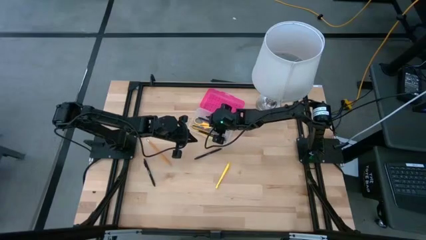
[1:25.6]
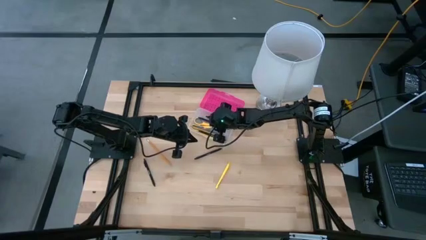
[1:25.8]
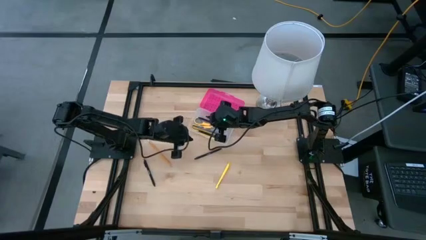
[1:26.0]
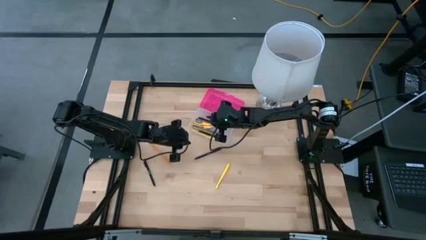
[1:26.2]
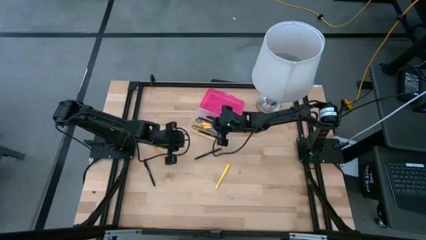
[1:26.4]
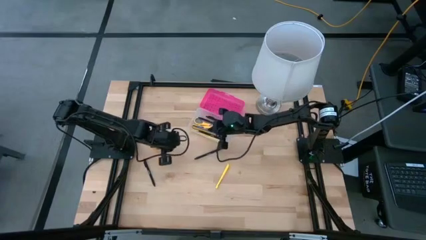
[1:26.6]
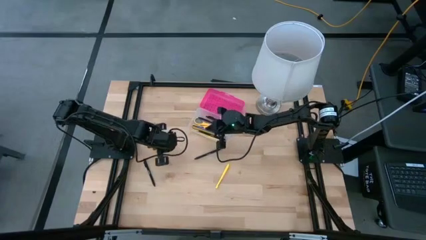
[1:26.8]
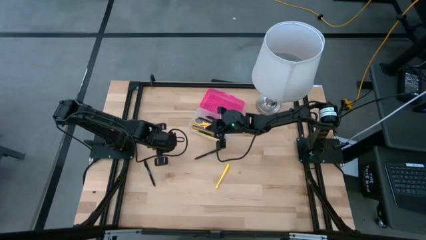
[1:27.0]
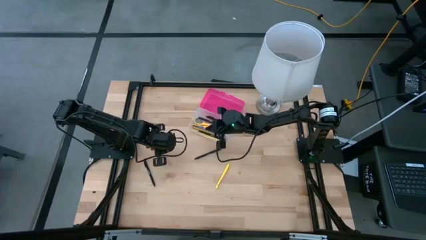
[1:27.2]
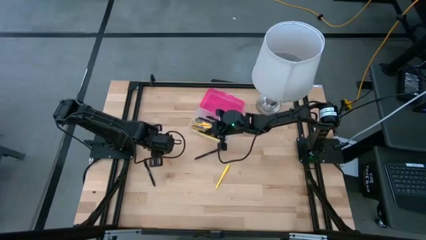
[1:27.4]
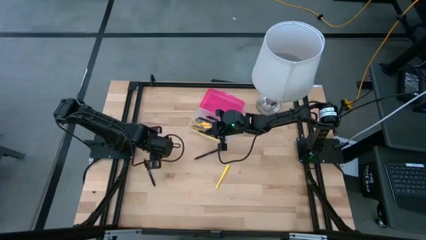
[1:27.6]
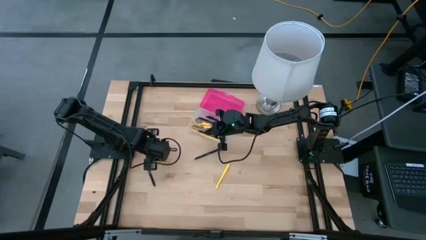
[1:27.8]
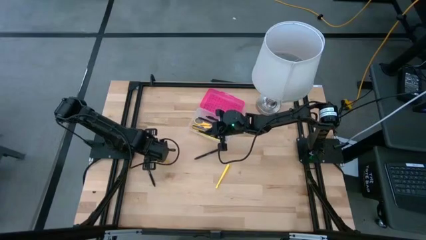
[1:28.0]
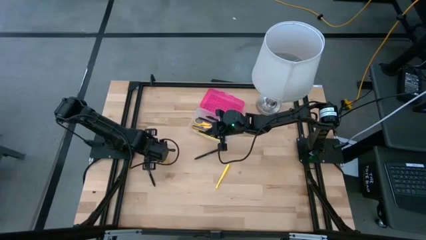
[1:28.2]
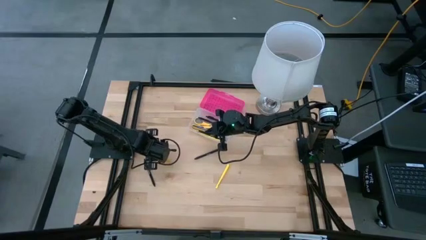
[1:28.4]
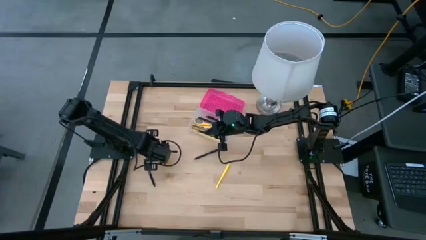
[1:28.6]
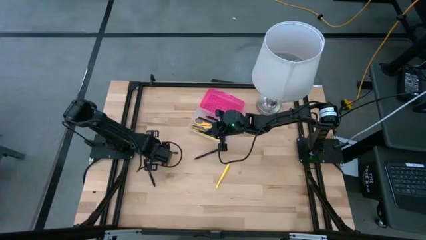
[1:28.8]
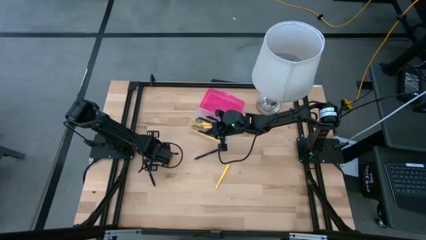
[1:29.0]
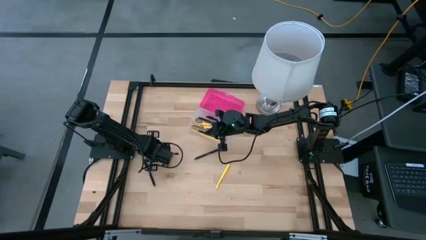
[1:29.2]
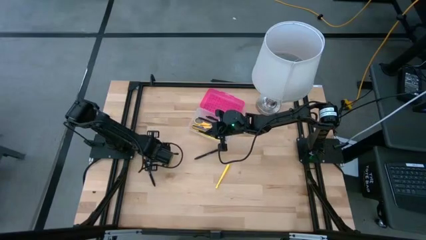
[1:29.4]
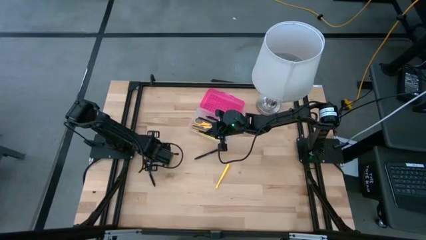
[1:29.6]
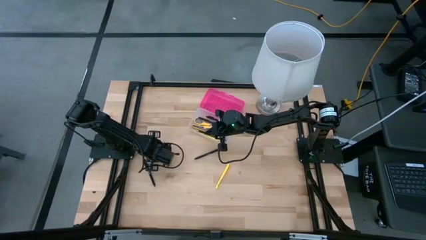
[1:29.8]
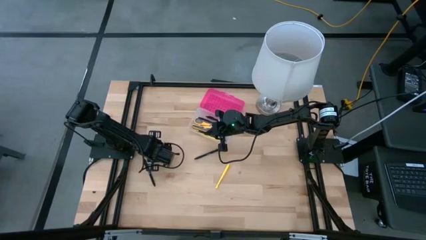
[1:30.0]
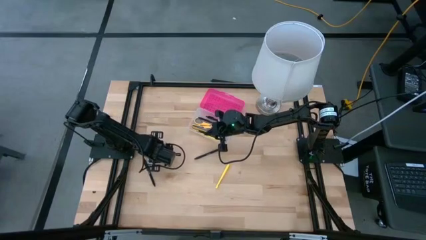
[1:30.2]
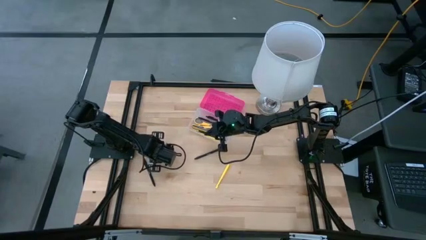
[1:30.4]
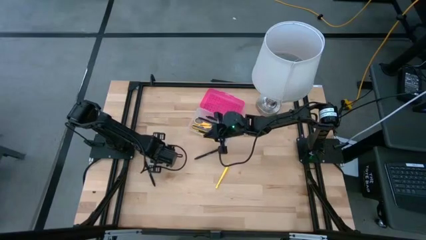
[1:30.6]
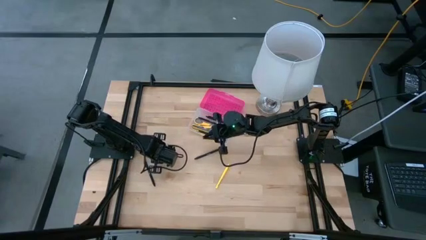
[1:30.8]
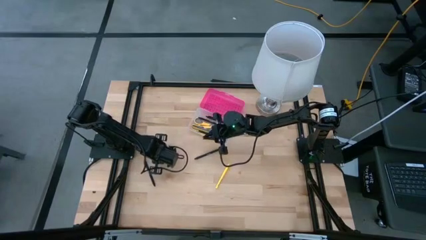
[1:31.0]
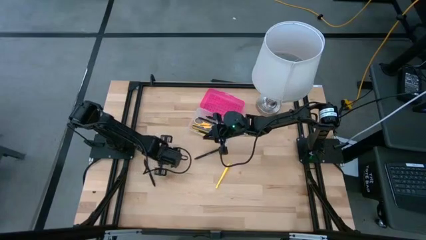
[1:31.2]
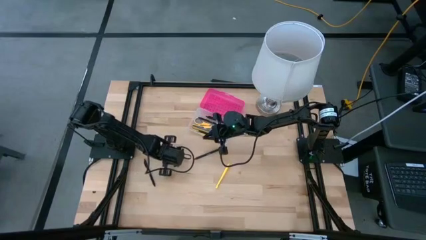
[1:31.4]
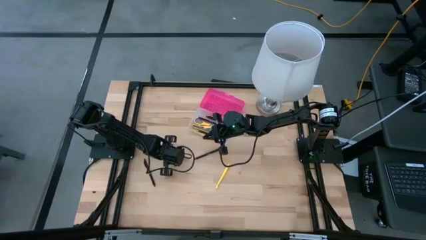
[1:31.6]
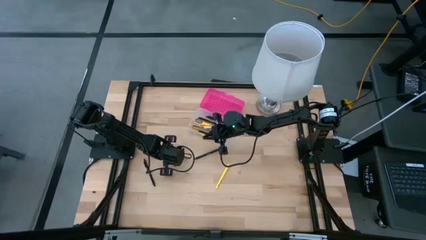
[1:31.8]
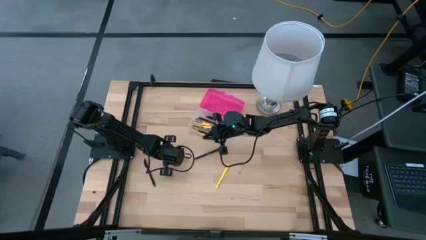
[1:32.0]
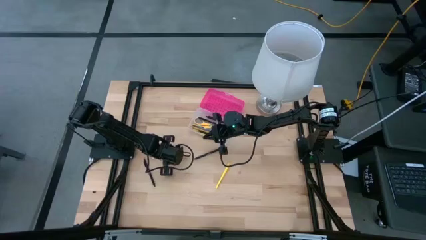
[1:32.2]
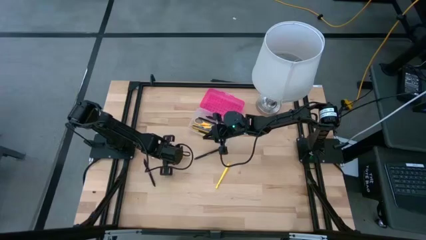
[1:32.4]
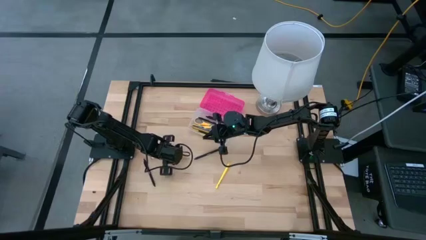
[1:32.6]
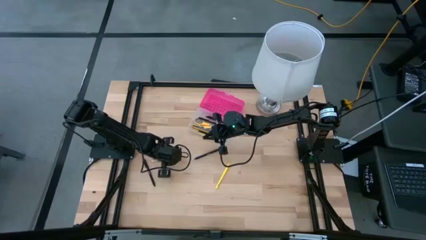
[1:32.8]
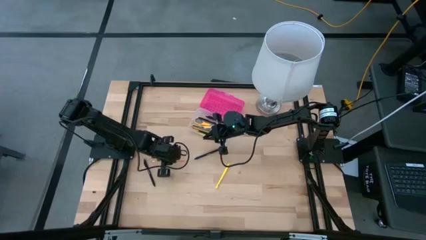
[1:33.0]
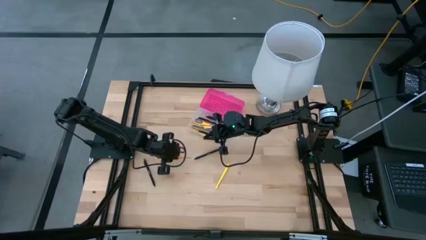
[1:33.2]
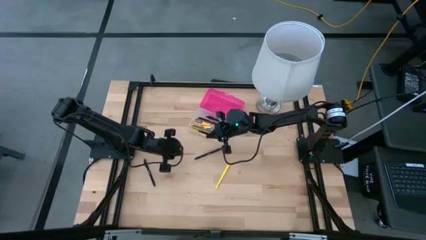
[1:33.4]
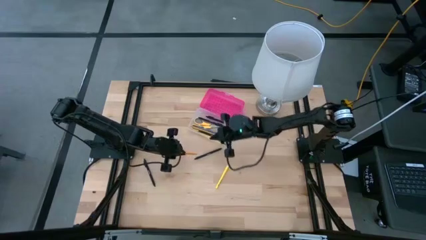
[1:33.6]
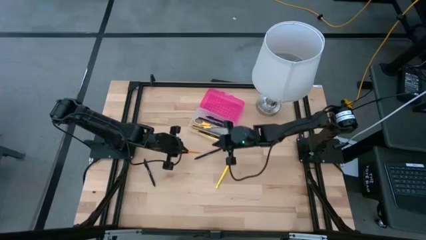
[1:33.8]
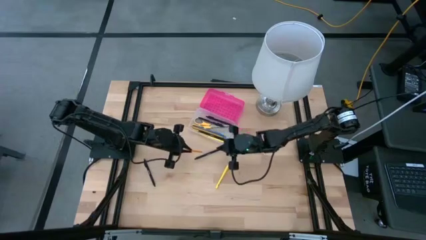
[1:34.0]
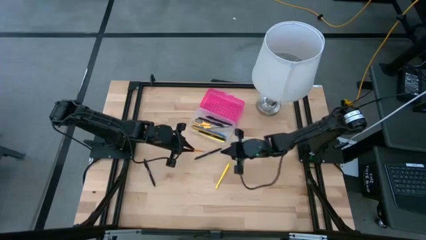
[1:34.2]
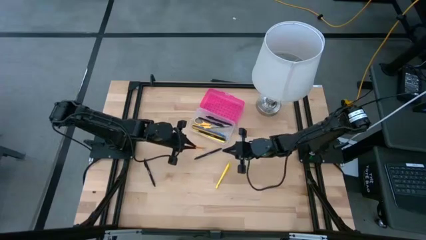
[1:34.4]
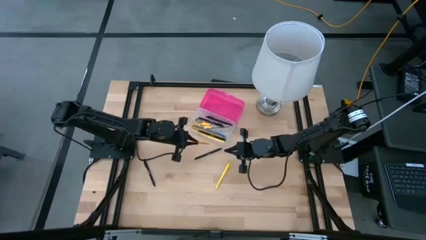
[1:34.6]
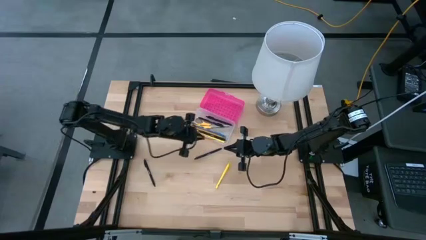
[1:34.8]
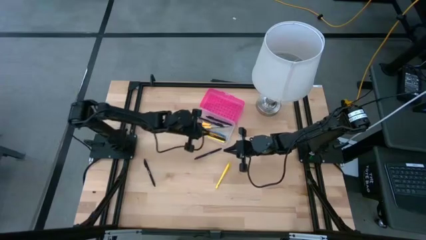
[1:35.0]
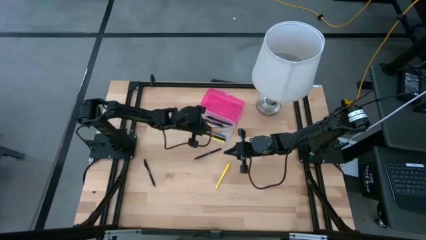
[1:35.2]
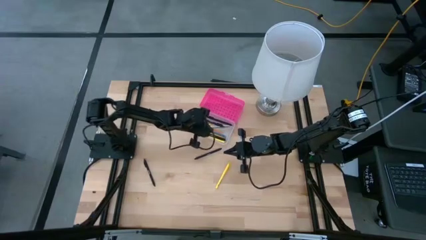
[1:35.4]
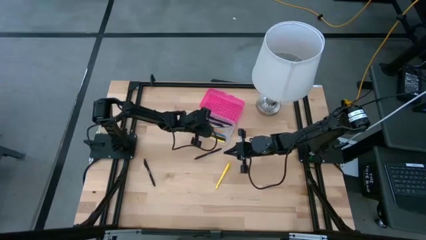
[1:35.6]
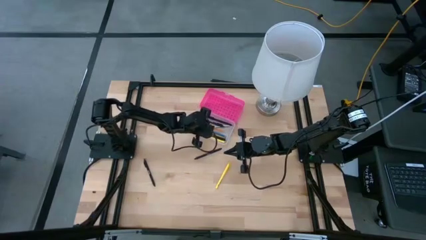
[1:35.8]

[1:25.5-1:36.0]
Task: Pick & place school supplies into a supply box
Put the orange pencil into the pink supply box

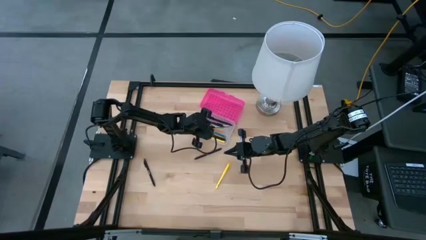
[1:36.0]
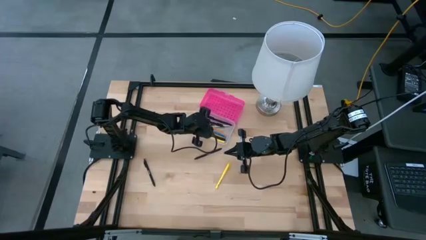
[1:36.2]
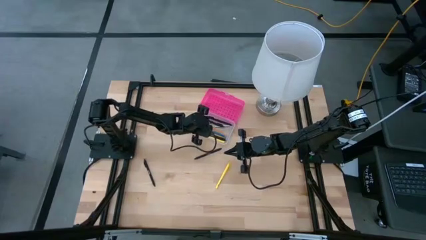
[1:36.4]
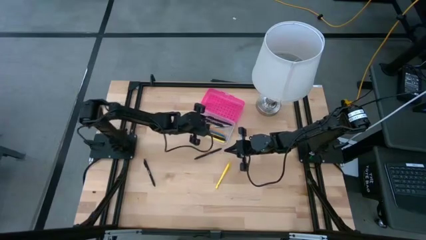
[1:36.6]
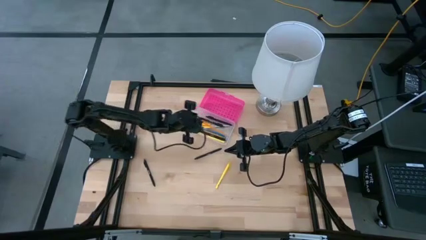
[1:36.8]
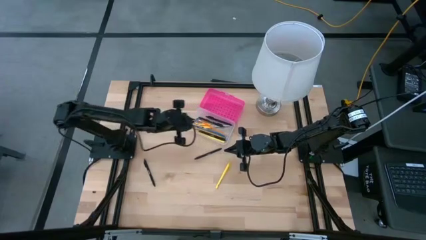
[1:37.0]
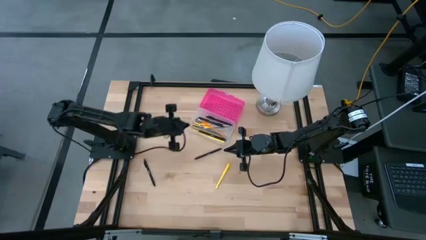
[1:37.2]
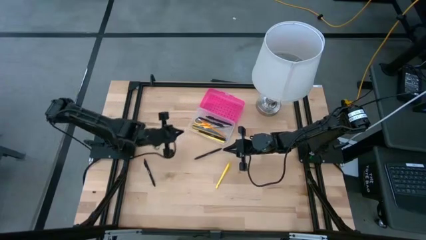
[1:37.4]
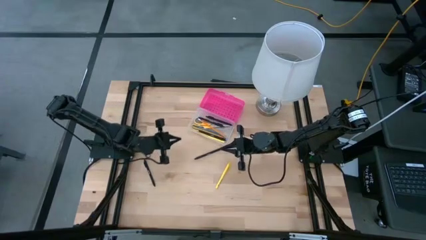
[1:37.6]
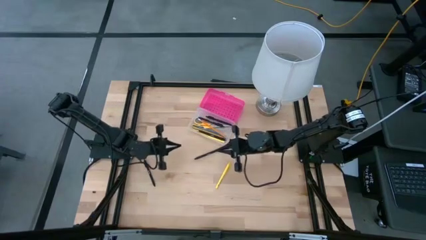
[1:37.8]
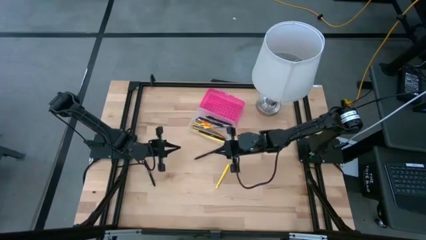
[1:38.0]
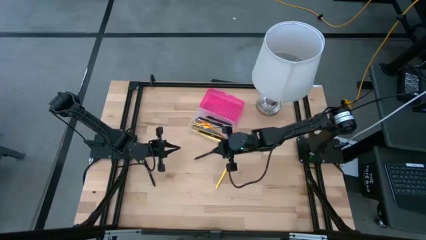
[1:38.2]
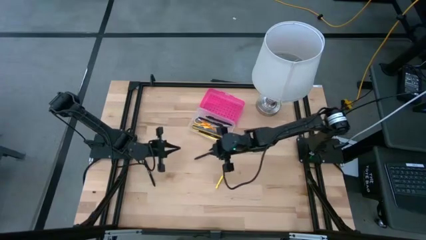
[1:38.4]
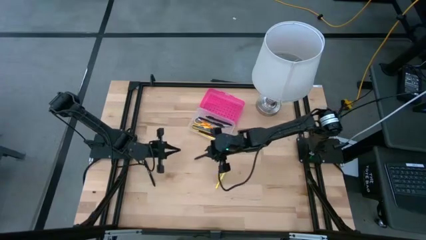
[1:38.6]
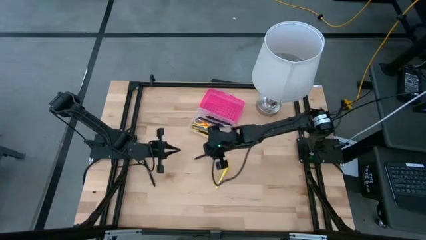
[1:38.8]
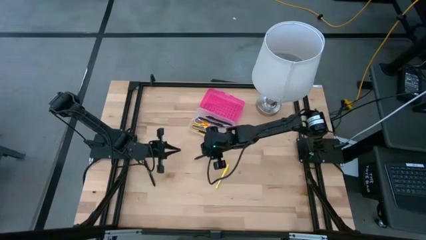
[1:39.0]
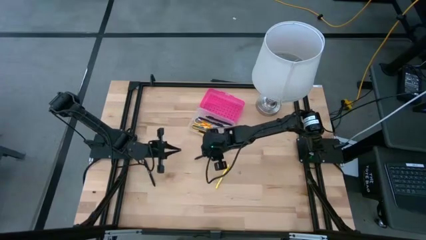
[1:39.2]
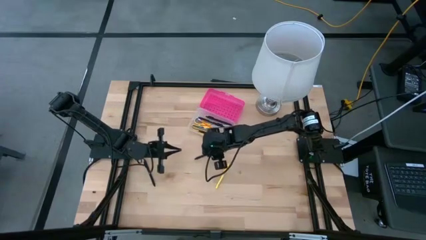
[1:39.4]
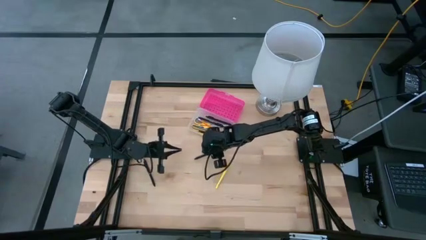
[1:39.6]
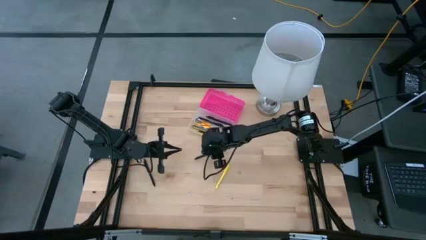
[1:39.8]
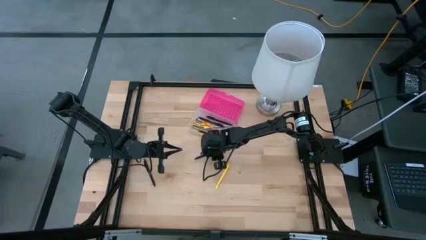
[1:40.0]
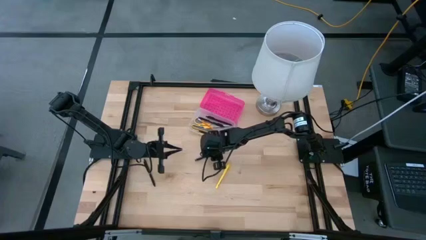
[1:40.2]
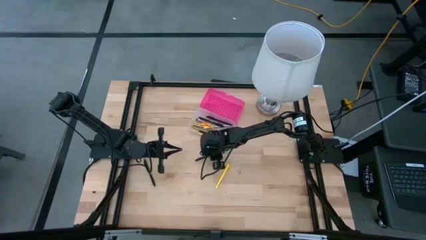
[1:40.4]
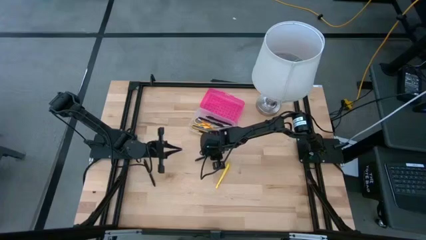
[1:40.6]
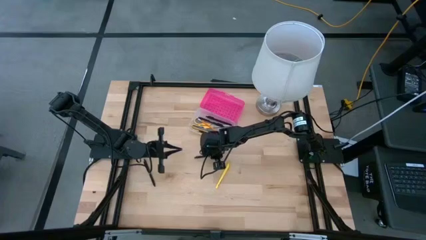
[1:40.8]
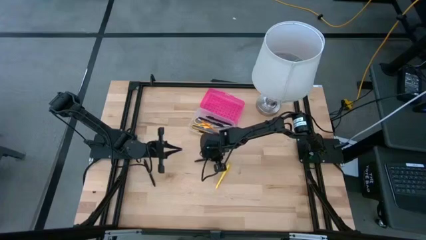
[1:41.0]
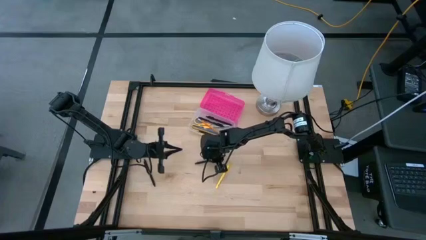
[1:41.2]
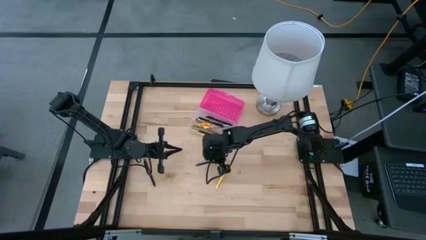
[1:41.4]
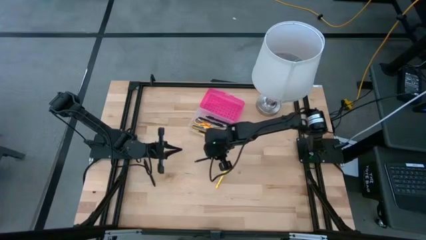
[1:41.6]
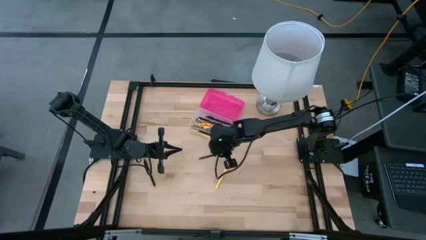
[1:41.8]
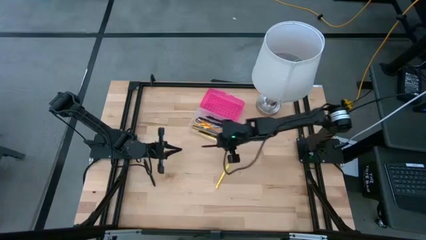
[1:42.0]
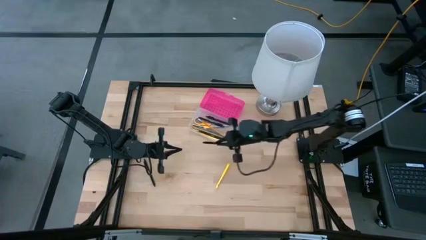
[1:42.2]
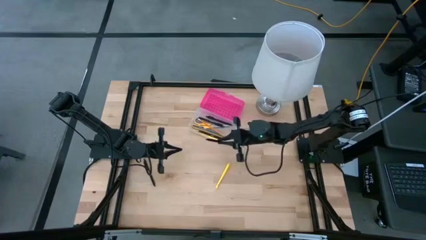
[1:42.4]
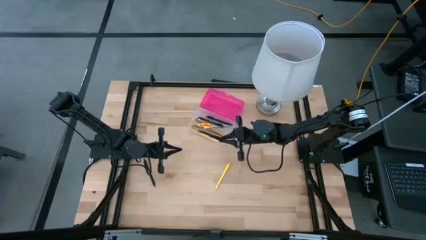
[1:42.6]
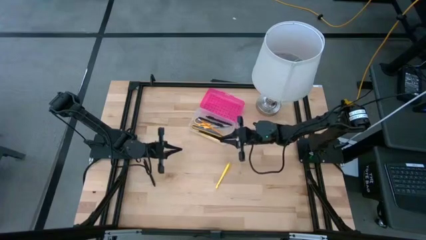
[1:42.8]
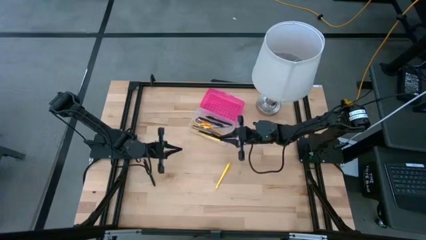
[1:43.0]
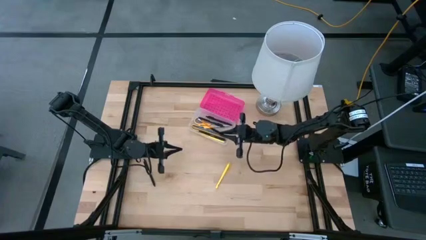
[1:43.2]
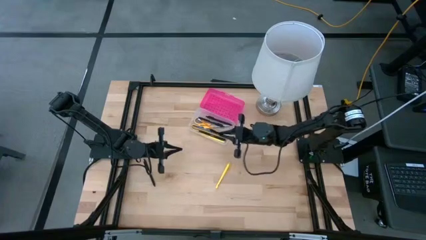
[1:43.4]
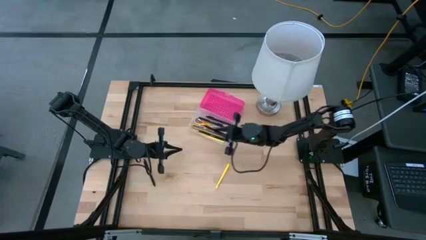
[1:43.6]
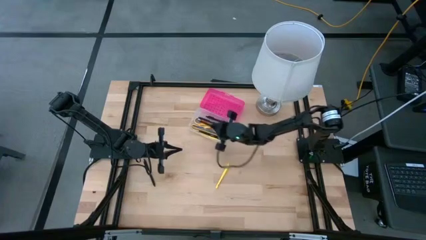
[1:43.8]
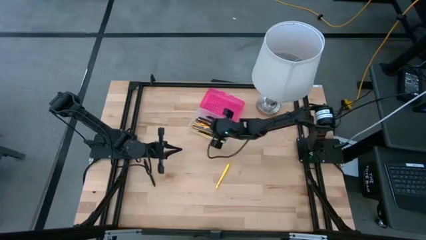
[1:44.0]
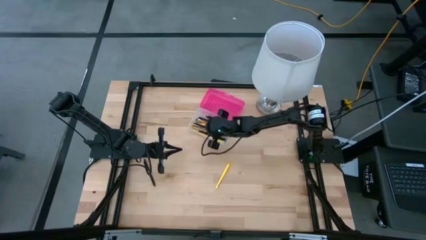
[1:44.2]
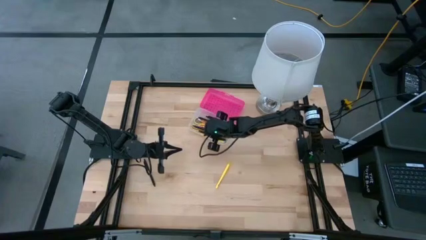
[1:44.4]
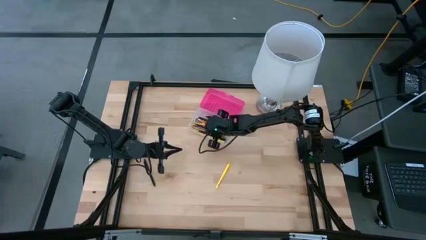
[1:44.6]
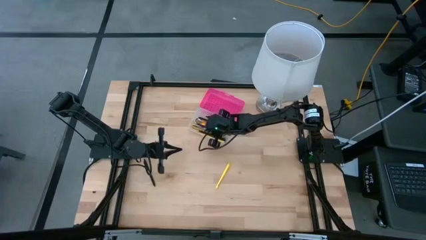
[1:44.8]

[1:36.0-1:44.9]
Put the black pen into the pink supply box
